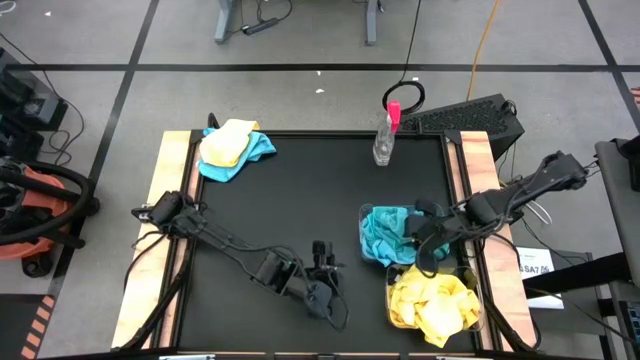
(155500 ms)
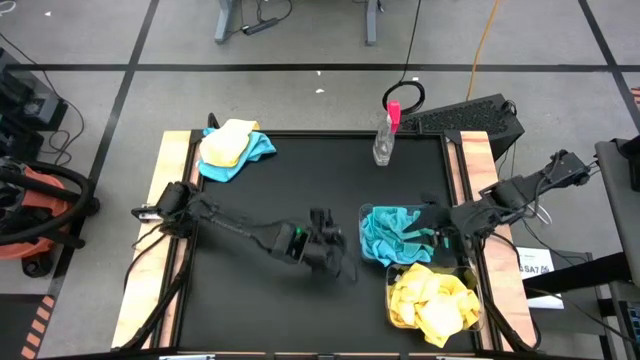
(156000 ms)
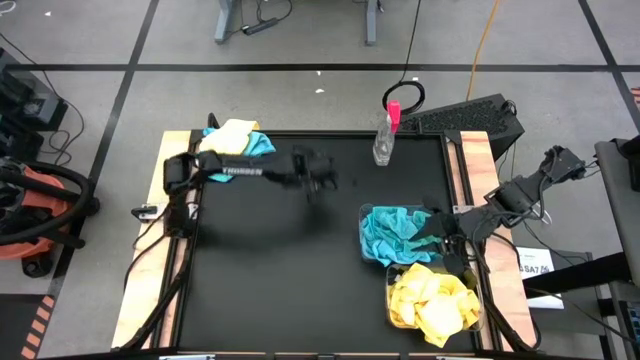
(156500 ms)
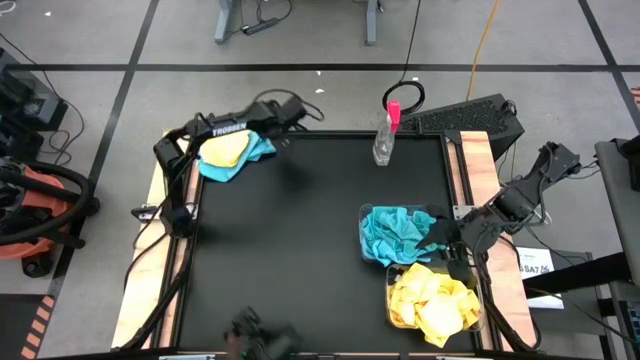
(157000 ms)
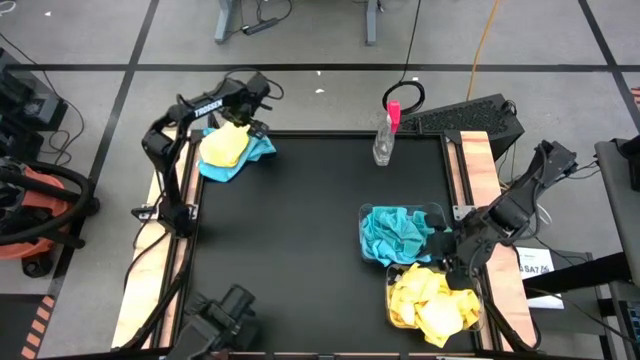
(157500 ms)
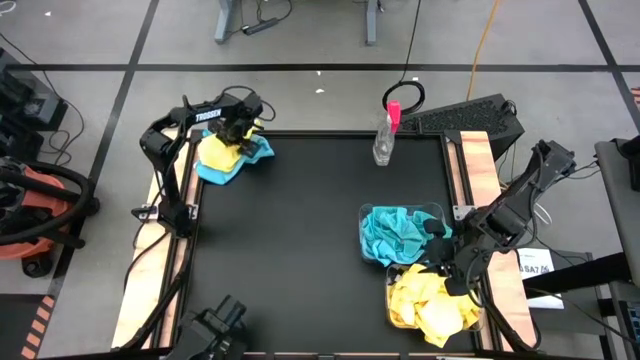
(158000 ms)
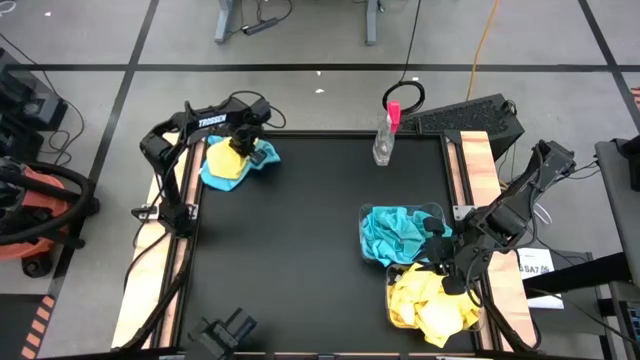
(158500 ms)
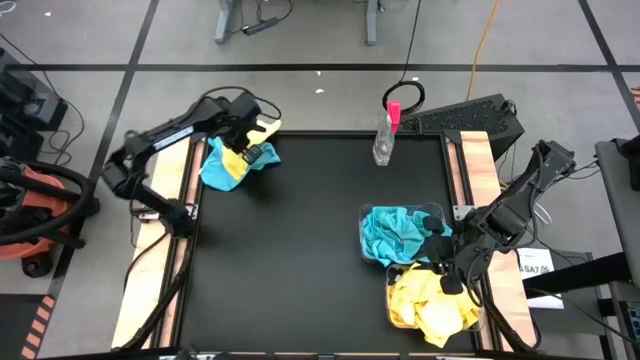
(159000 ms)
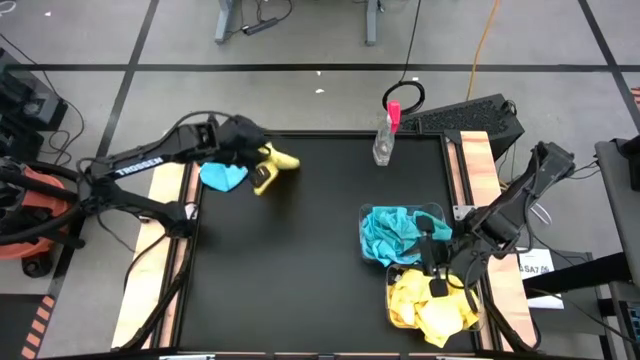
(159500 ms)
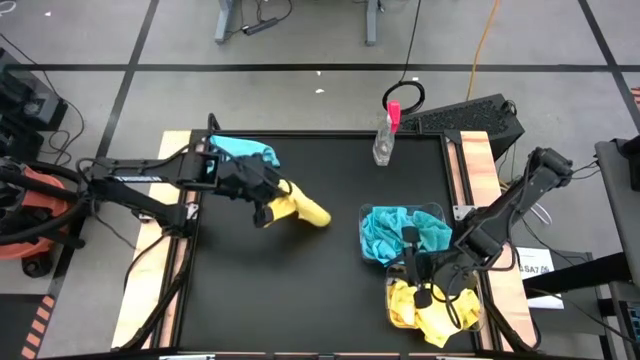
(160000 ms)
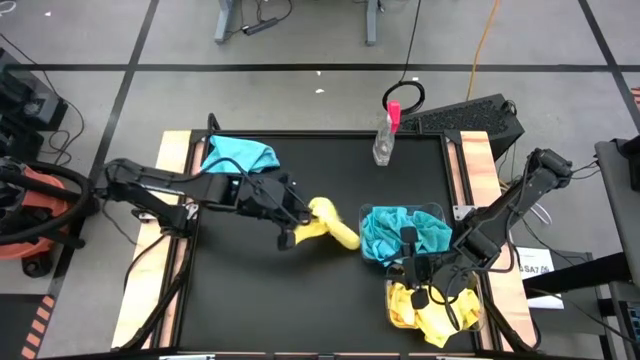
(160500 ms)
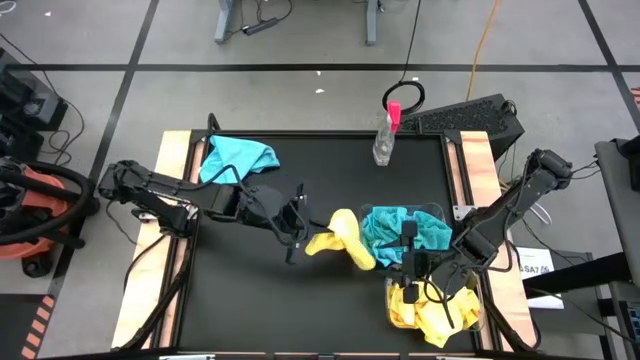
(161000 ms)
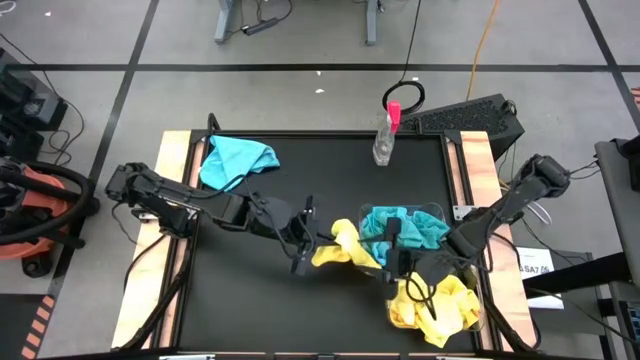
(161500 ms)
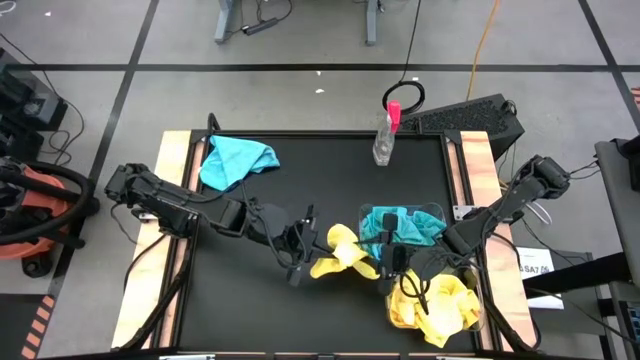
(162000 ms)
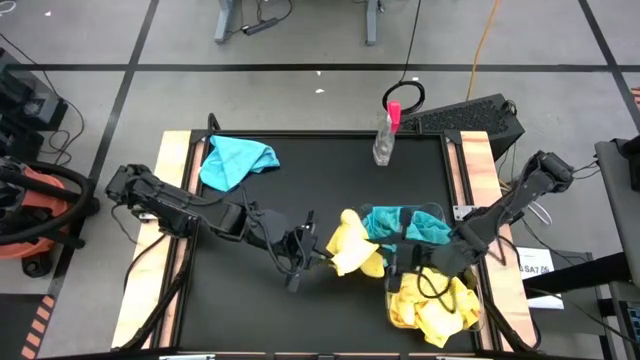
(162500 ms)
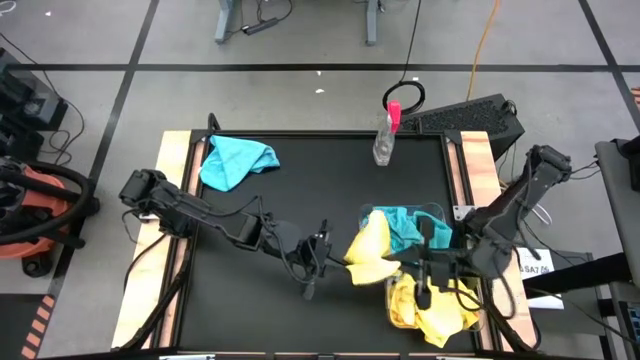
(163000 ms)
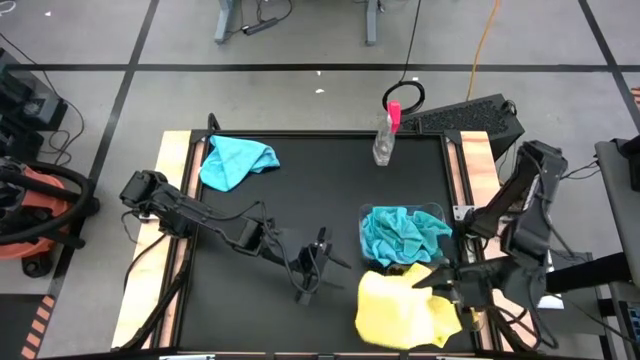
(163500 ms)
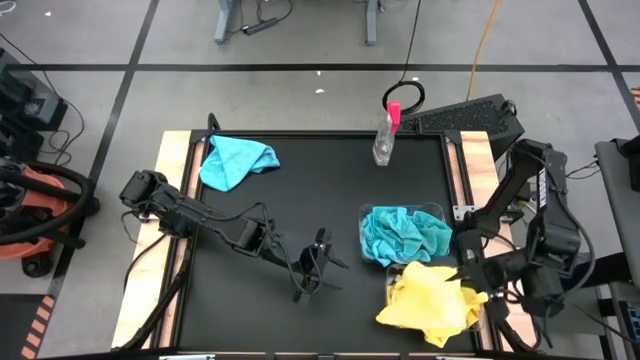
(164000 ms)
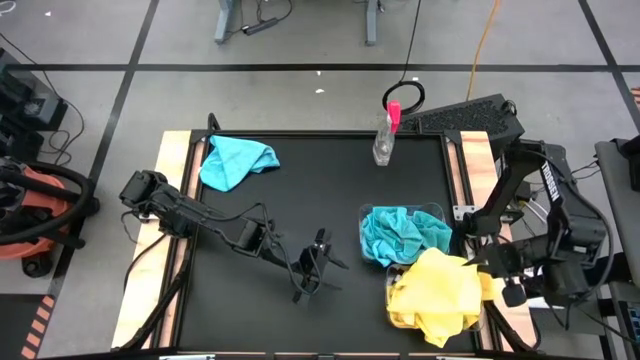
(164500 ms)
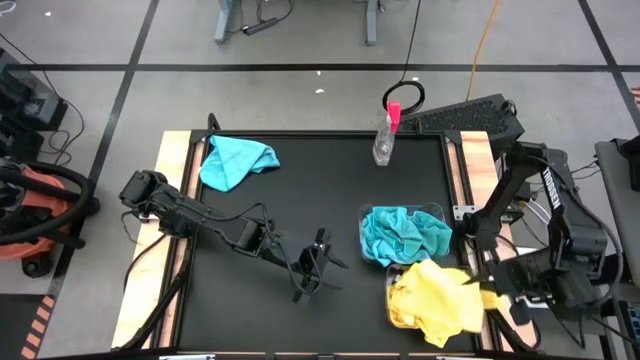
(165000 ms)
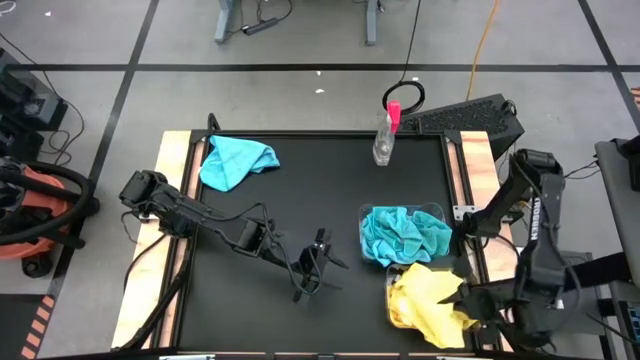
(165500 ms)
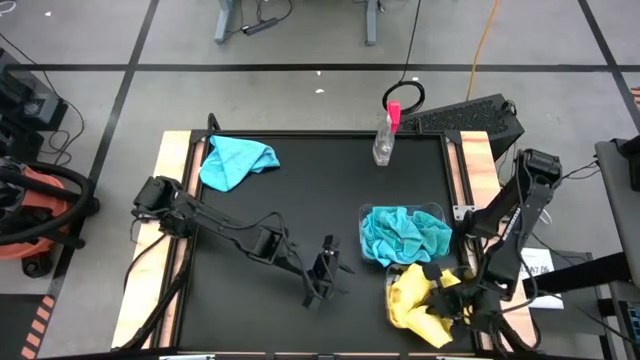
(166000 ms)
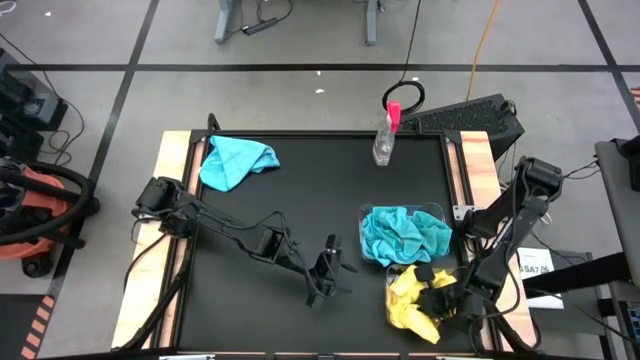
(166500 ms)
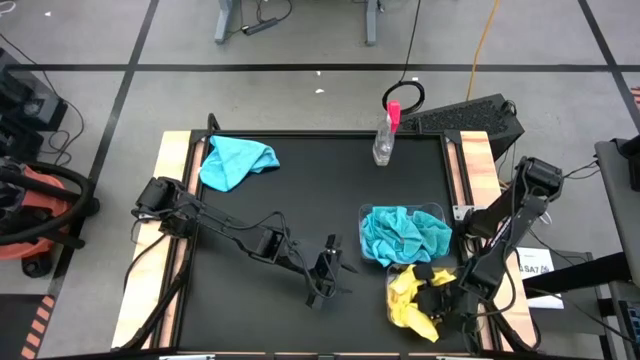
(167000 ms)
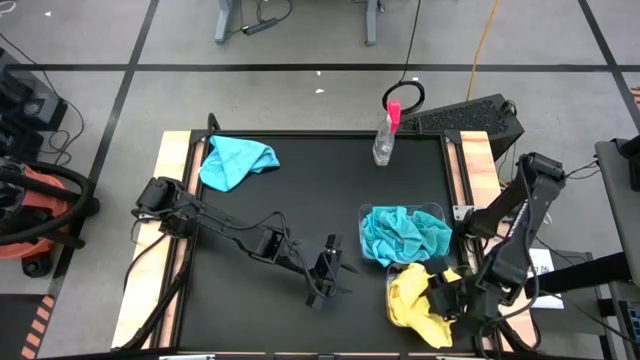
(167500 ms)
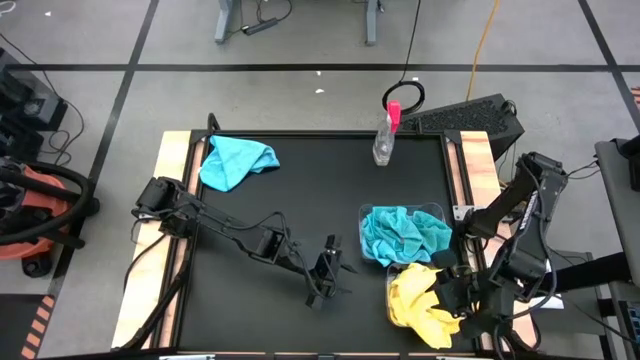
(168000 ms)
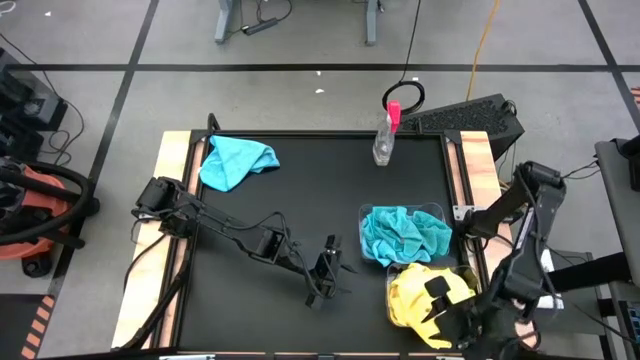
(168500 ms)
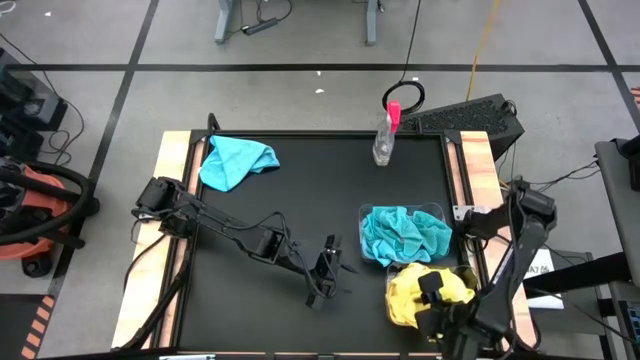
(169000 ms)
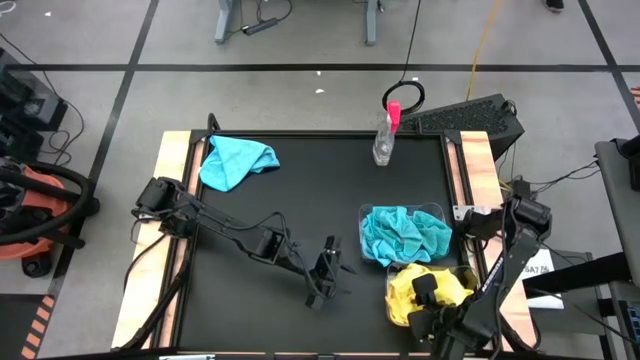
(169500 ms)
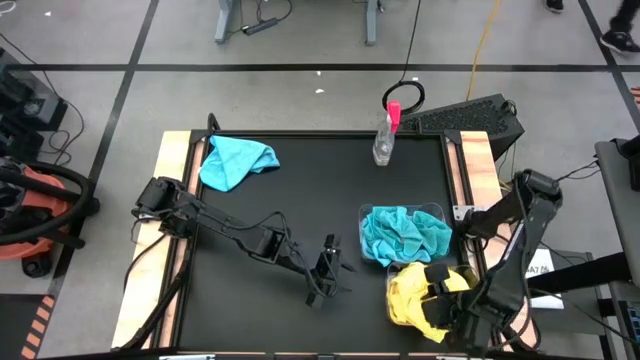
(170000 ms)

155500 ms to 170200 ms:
Task: Sort microfiber towel by color & place in baskets
Put the yellow towel into the bottom transparent bin

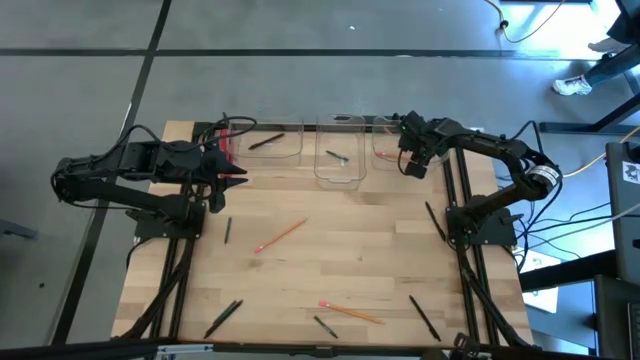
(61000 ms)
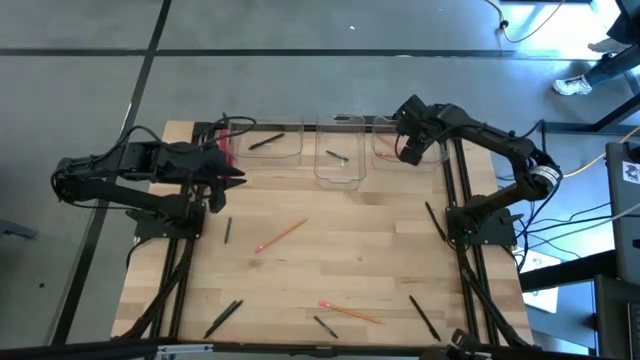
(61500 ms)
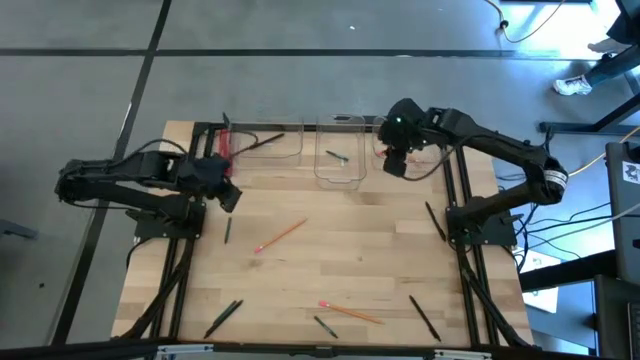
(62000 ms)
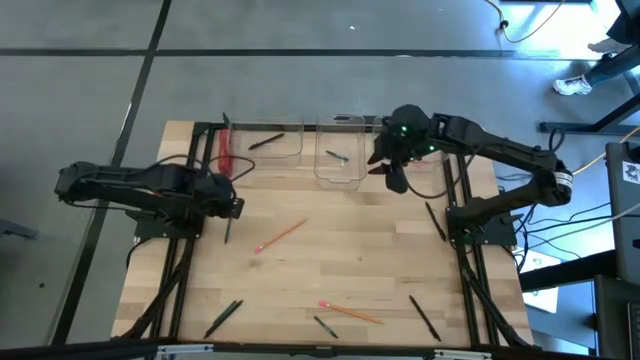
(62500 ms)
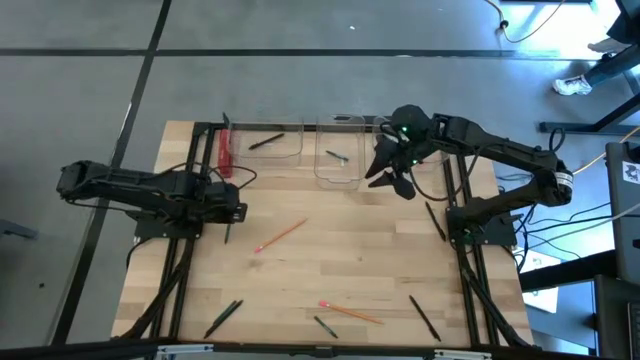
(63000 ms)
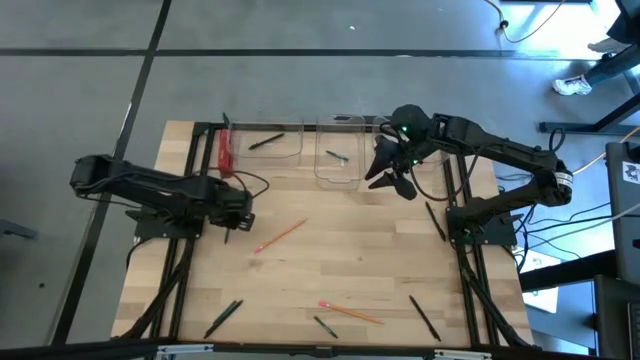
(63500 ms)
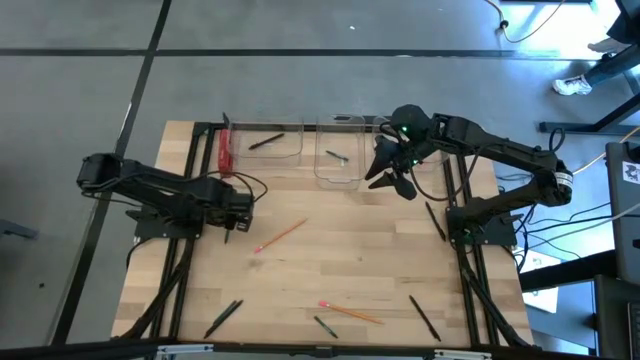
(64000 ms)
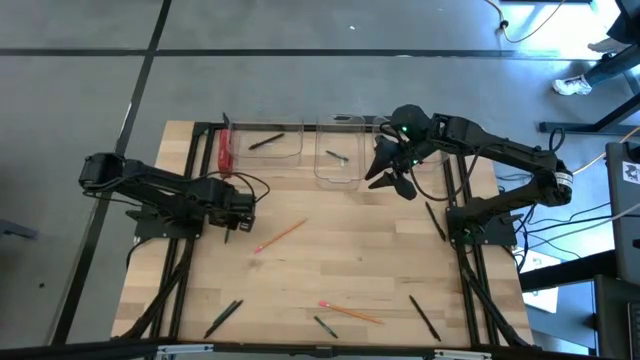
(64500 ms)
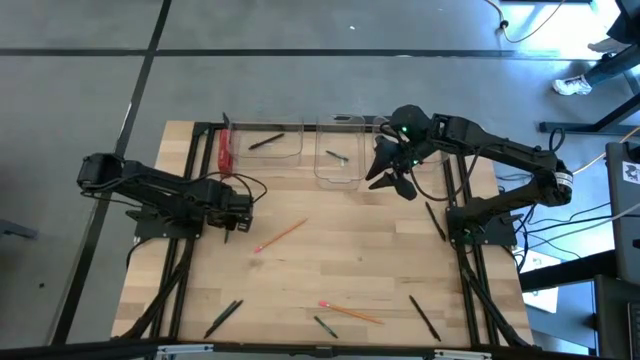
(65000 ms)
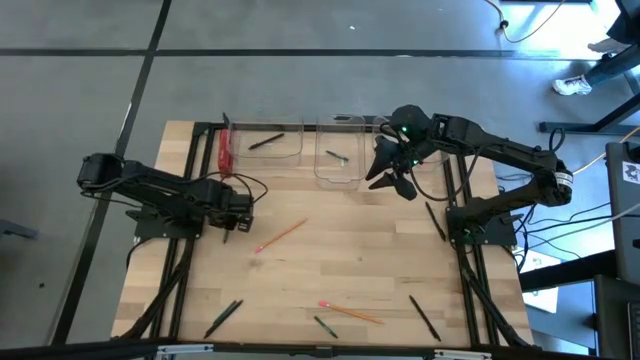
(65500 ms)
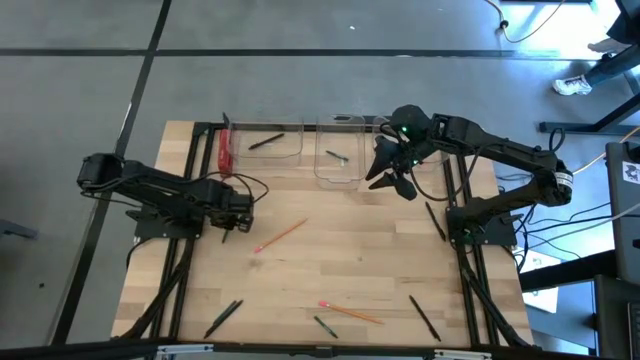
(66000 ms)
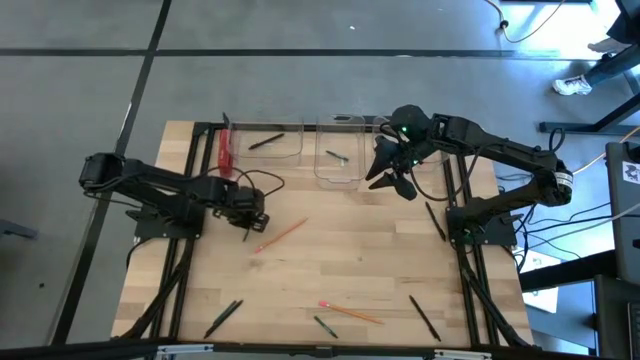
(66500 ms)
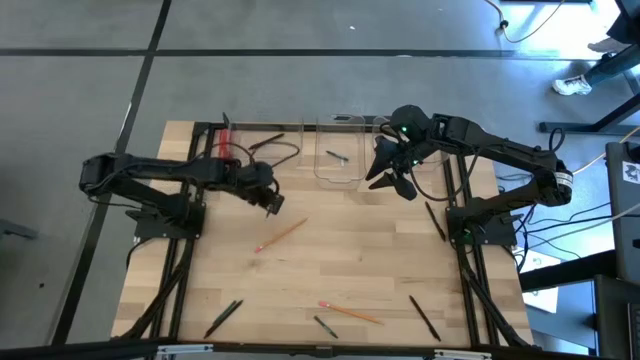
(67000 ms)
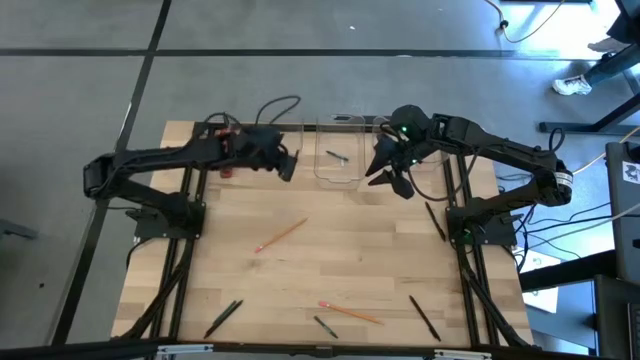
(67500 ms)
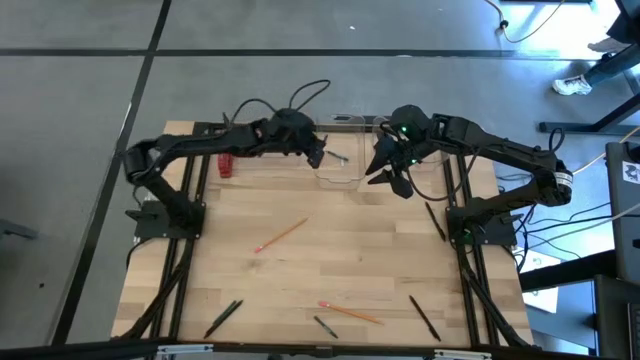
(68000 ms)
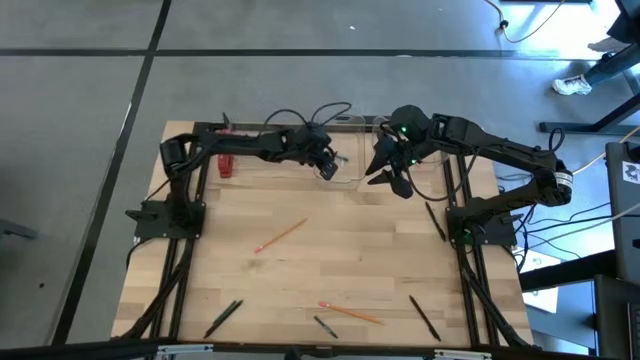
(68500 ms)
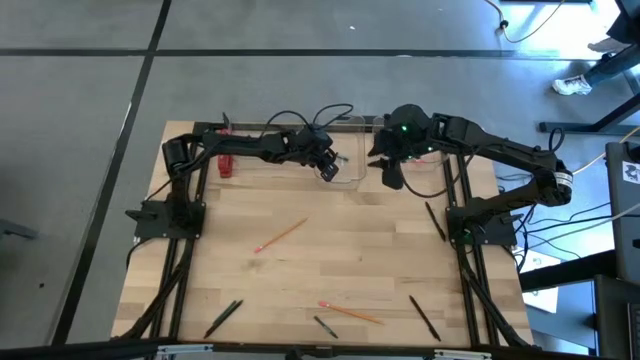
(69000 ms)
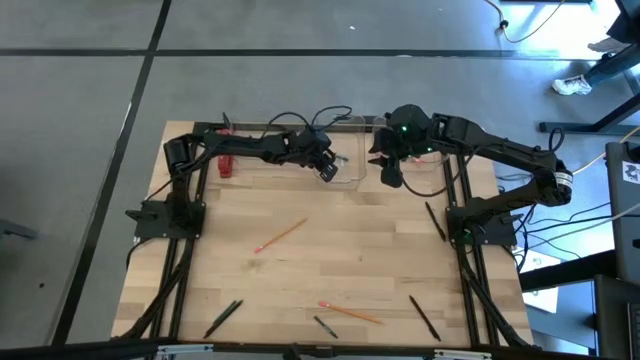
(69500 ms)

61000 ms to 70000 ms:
Task: Sort crayons/erasers/pens/pencils in bins
Put the green crayon into the middle transparent bin
